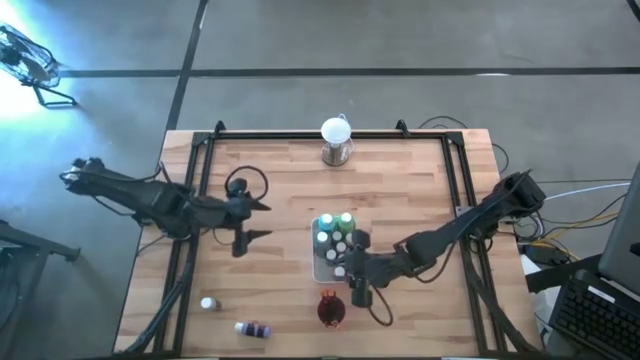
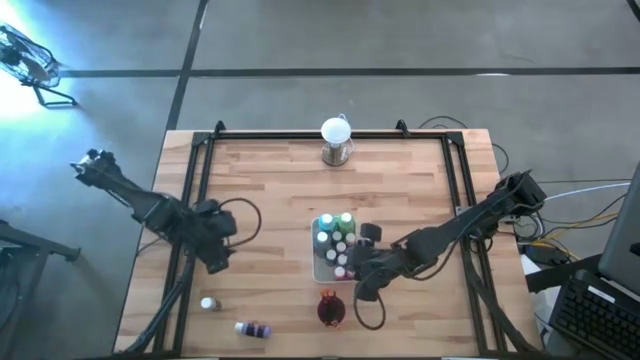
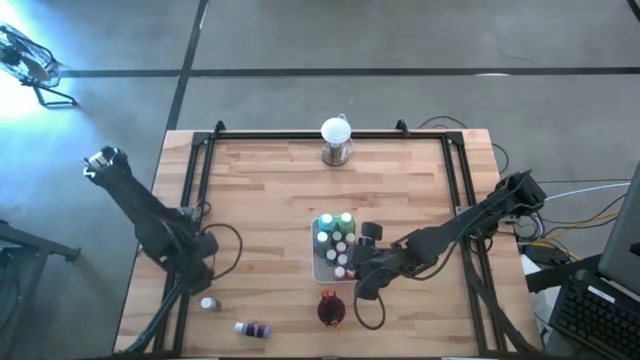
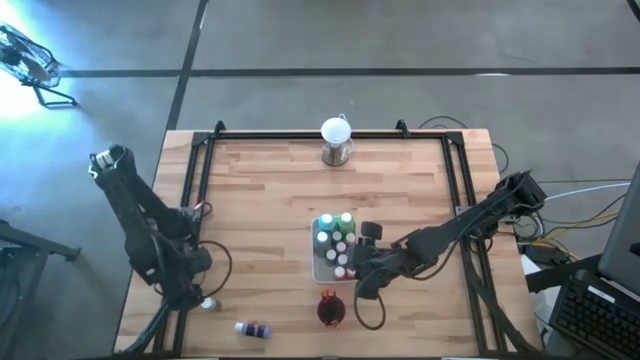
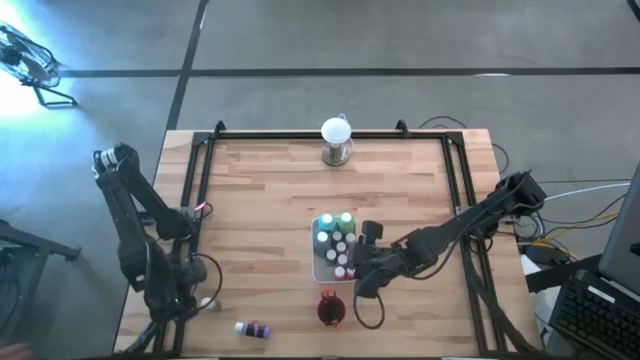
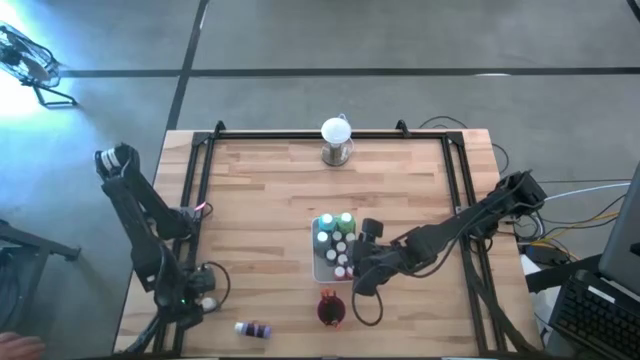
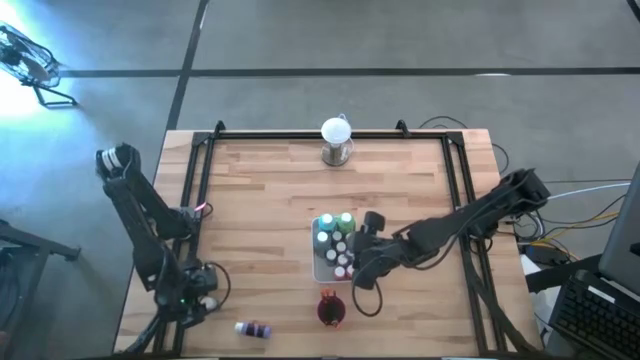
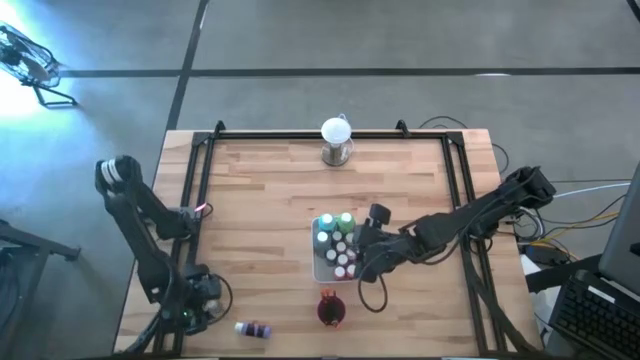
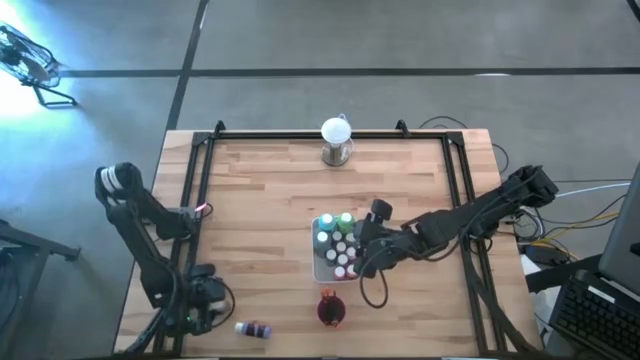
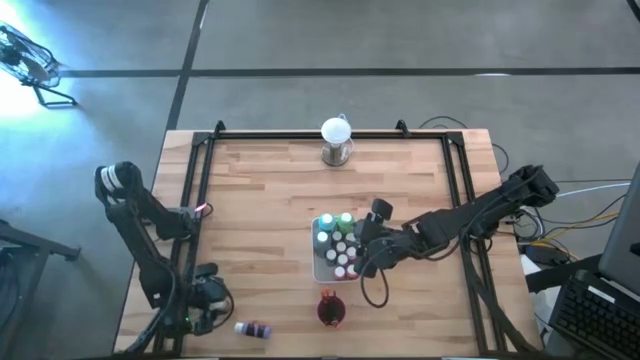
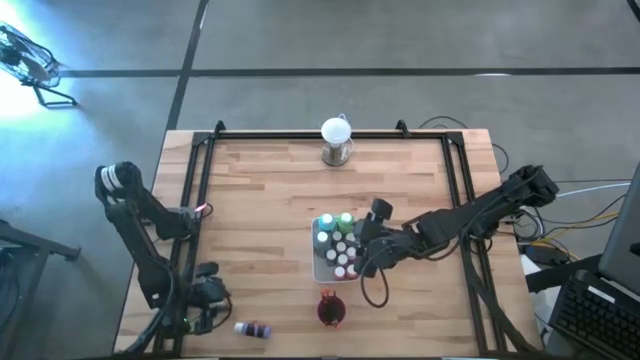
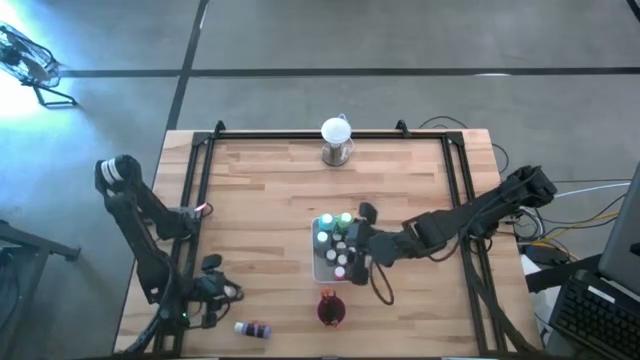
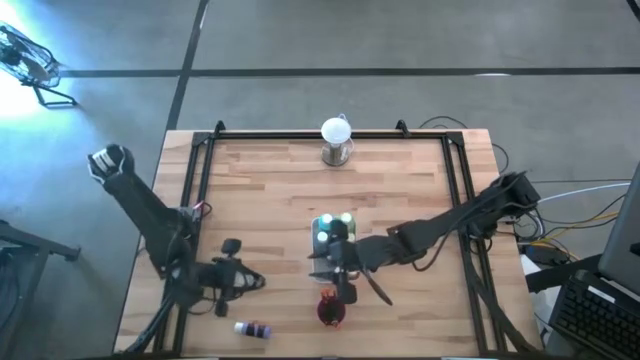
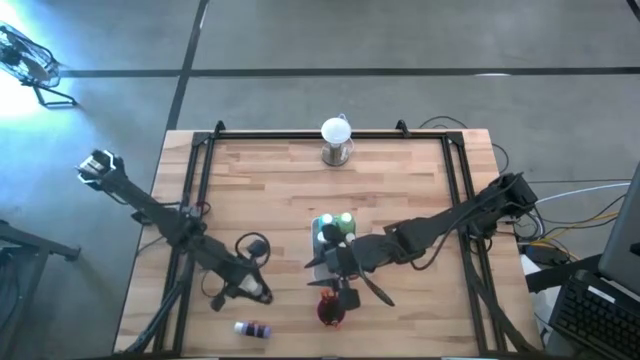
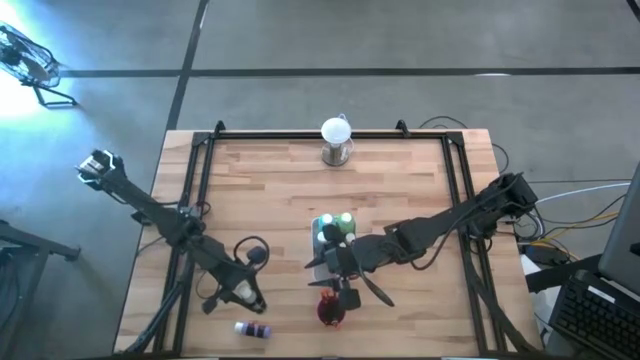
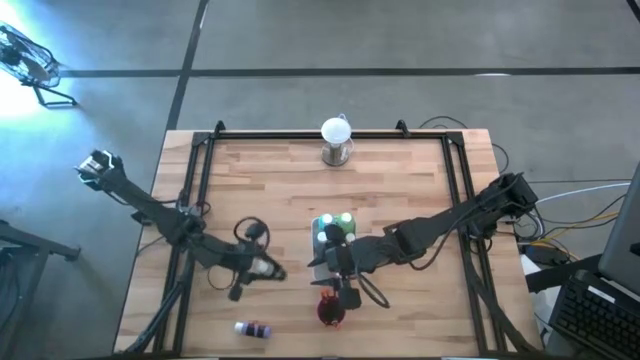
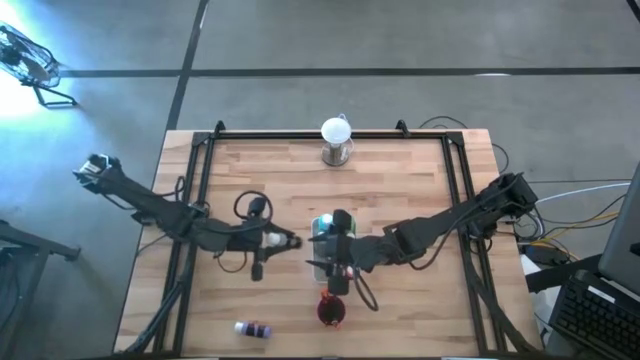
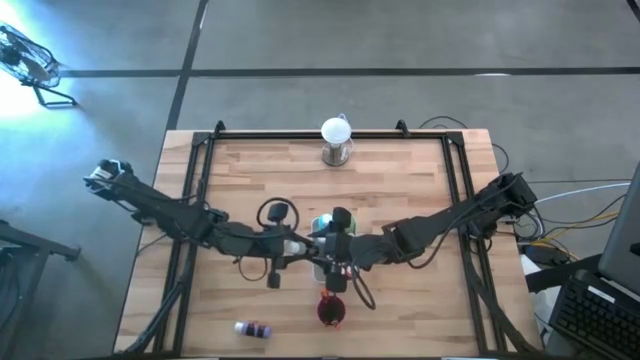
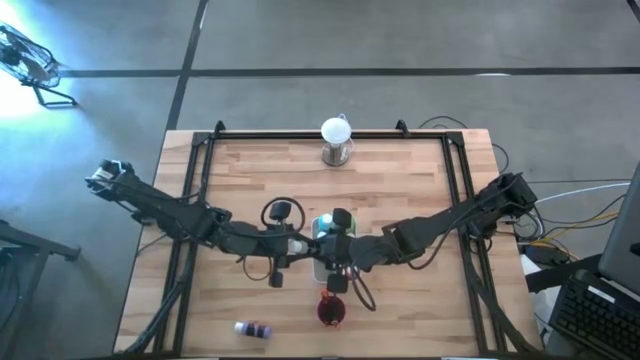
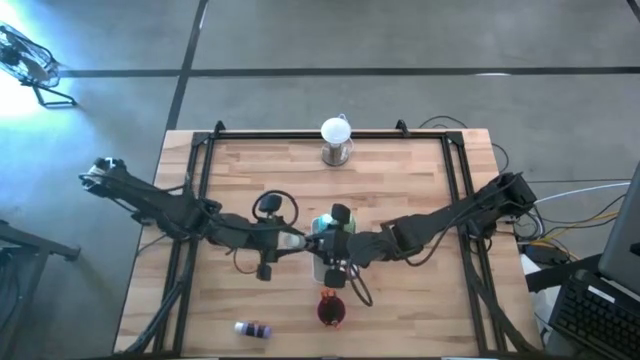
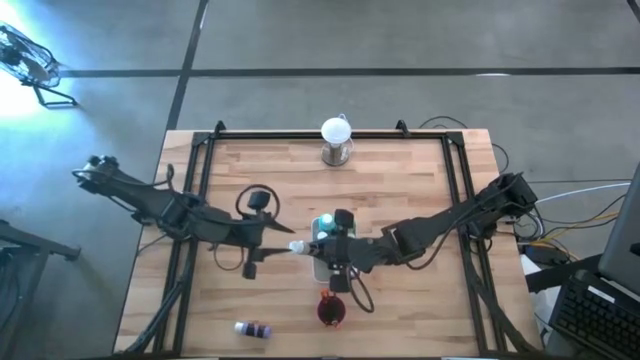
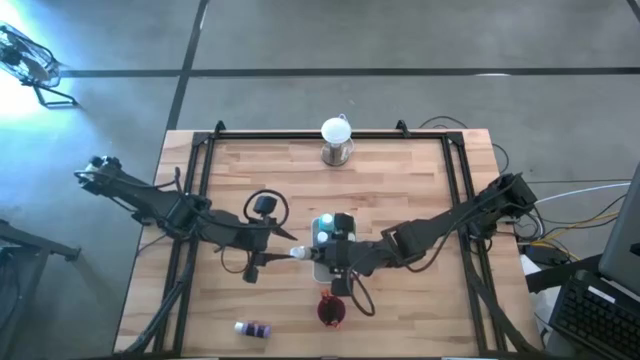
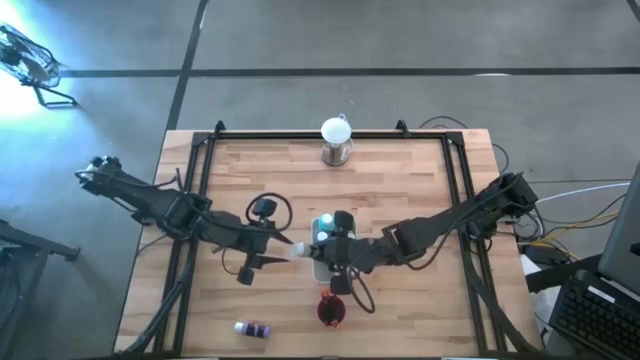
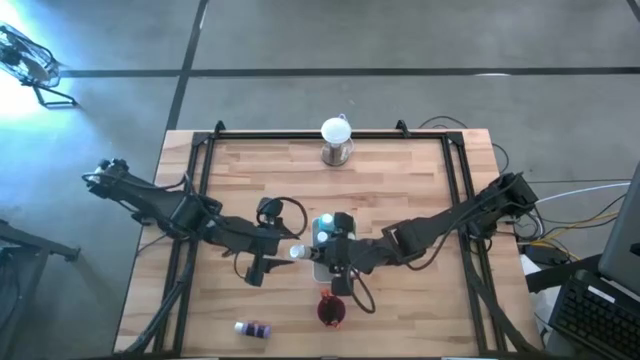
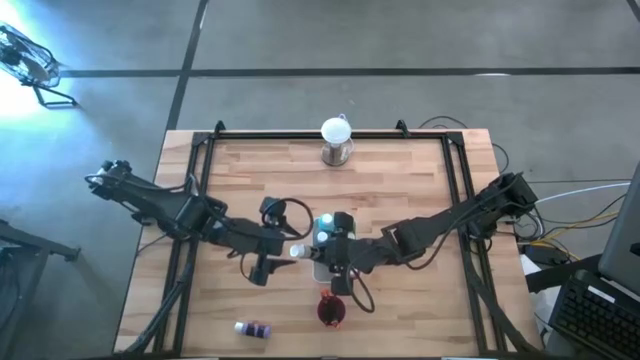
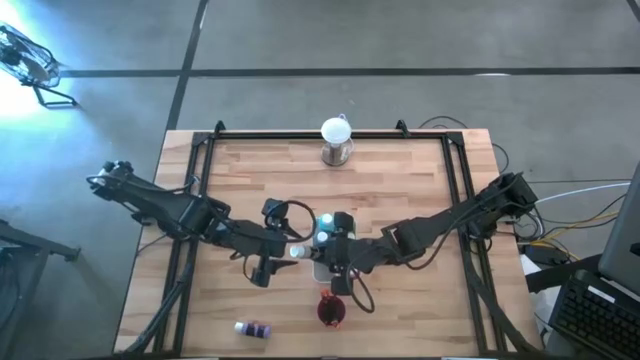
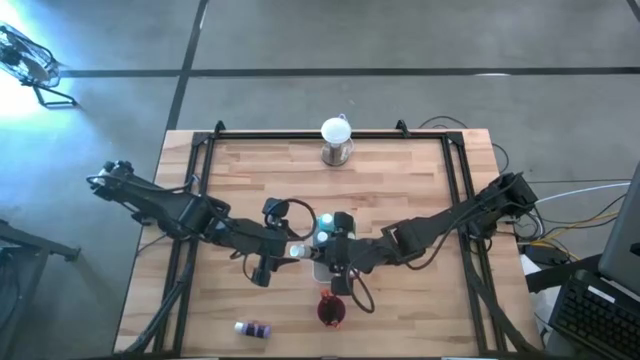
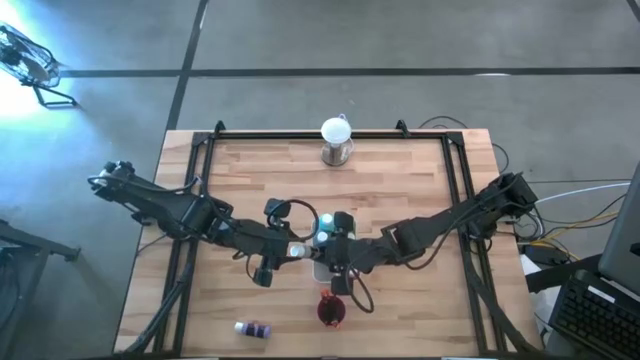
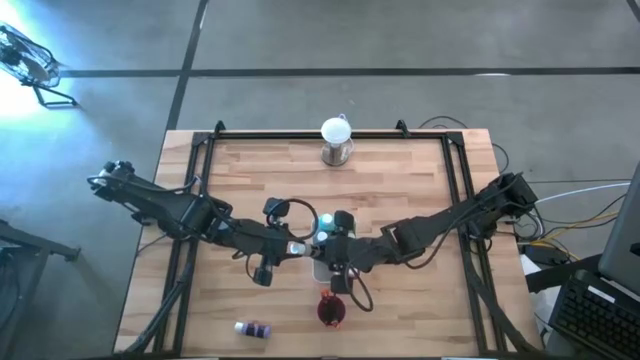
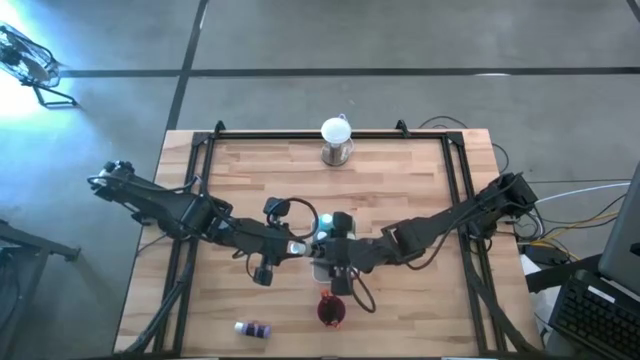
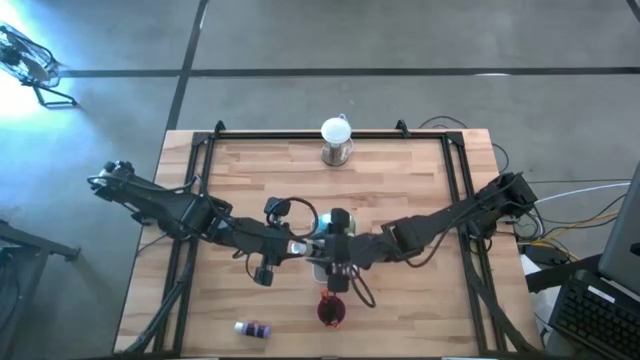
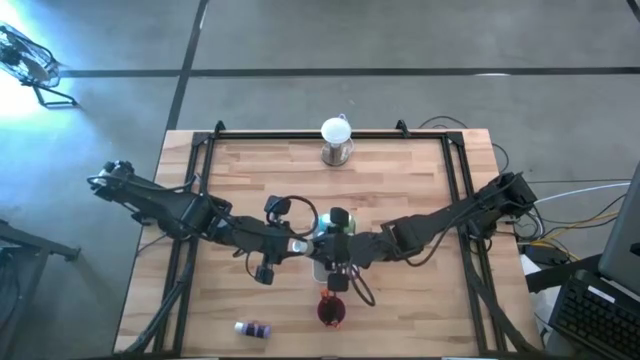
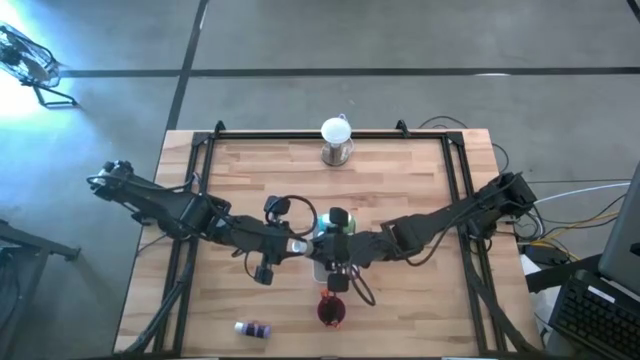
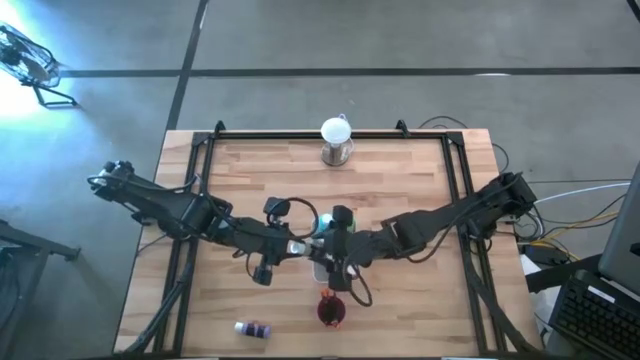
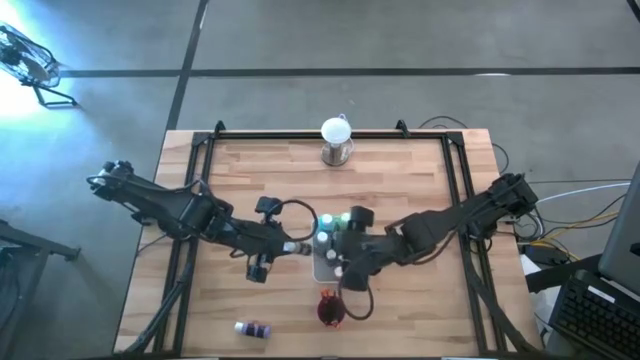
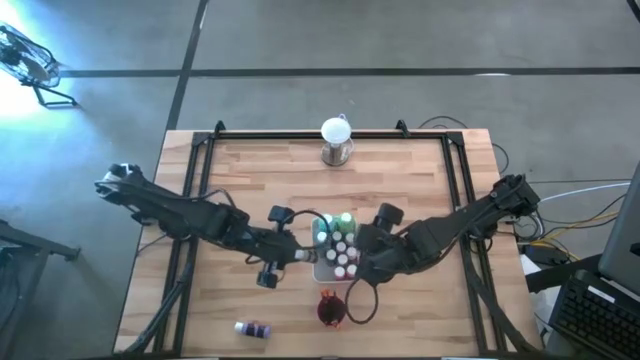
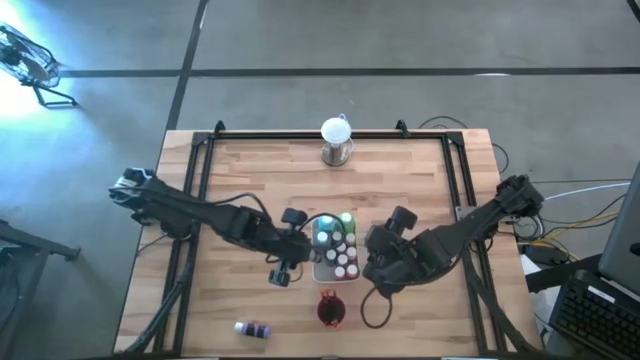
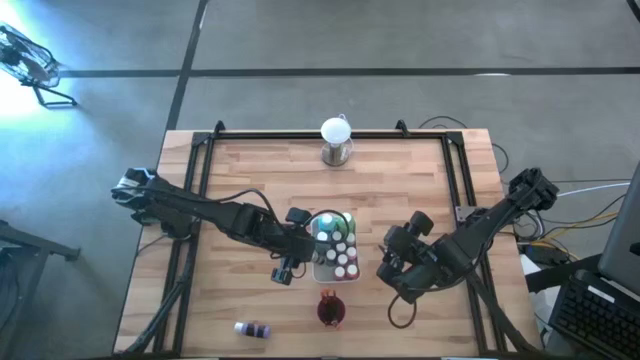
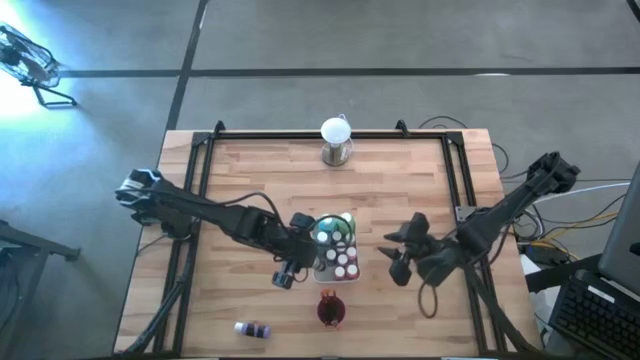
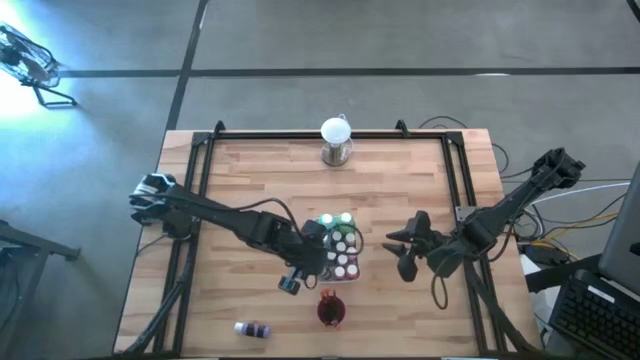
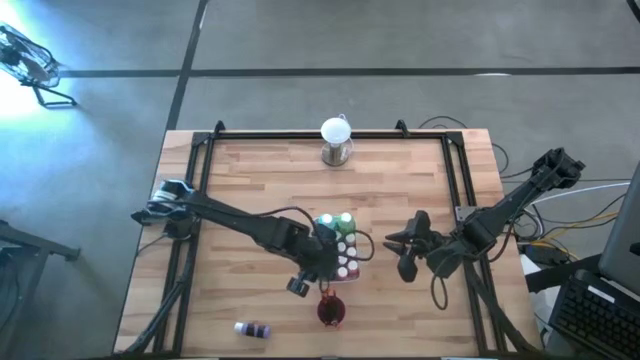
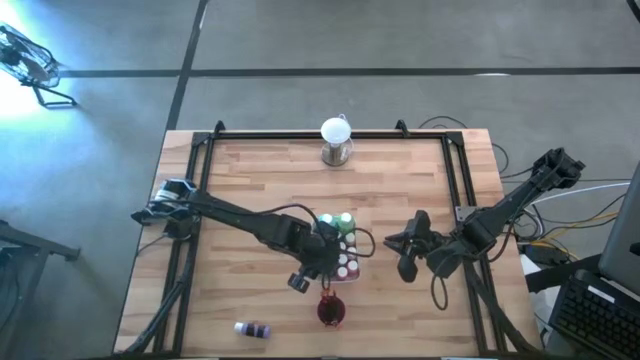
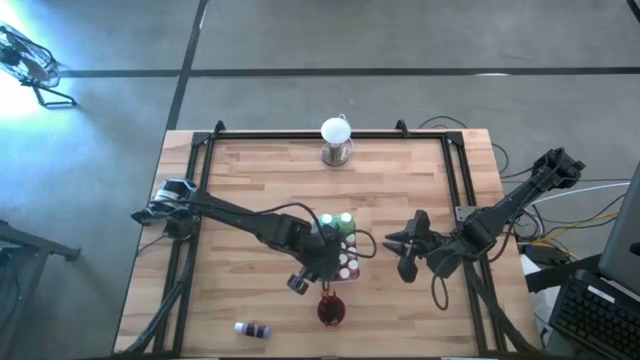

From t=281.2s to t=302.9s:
Task: Pick & Place Paint Supplies
Put the gray paint bottle into the white bin
